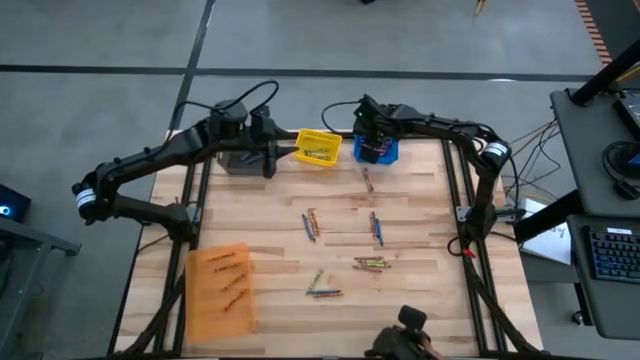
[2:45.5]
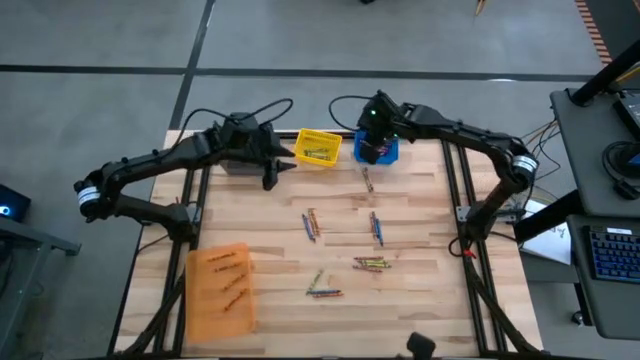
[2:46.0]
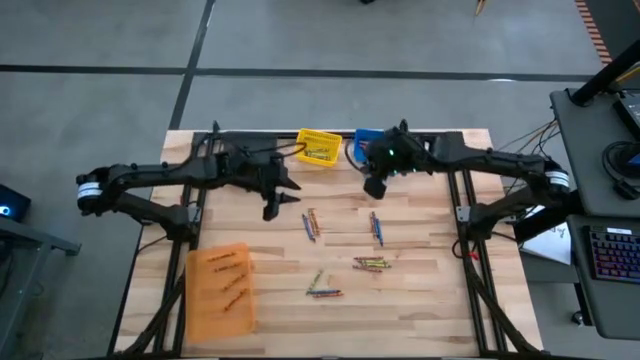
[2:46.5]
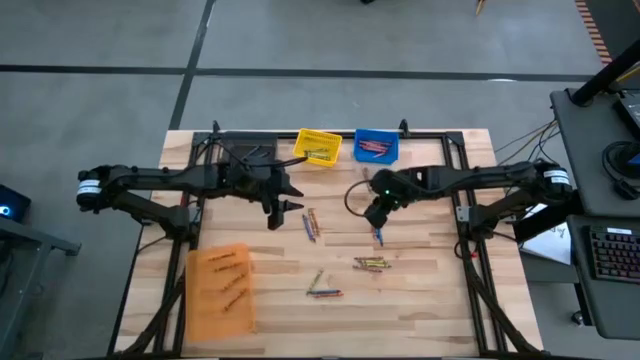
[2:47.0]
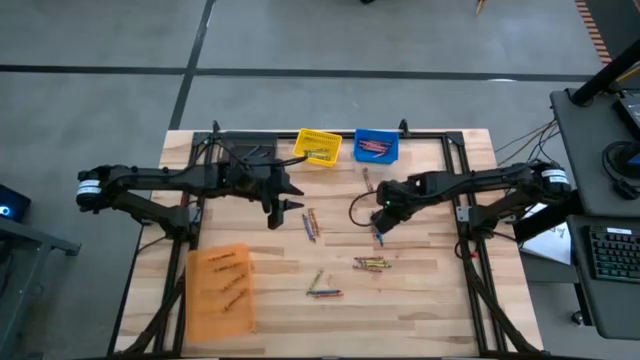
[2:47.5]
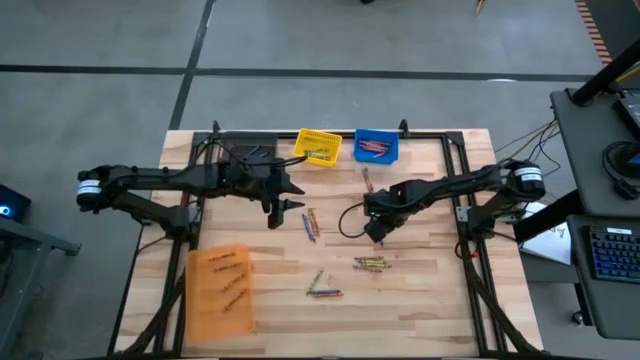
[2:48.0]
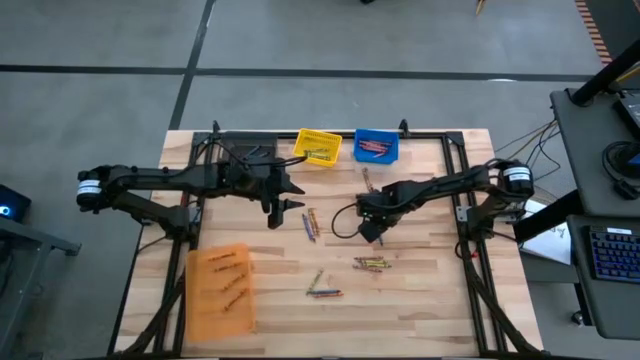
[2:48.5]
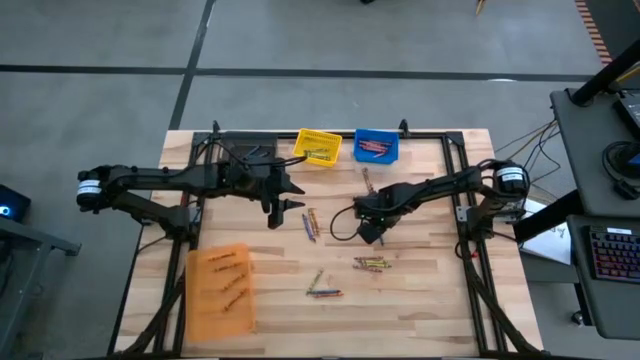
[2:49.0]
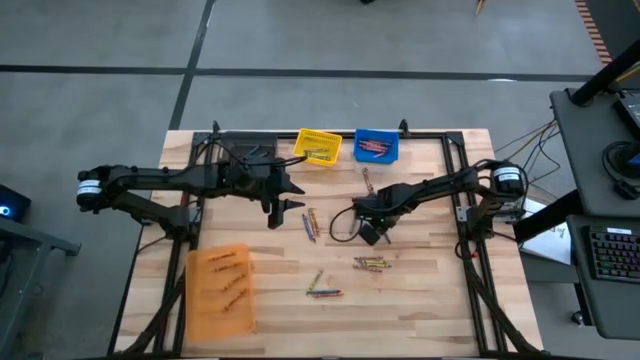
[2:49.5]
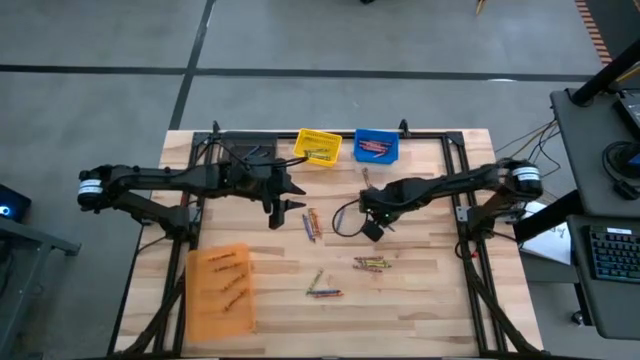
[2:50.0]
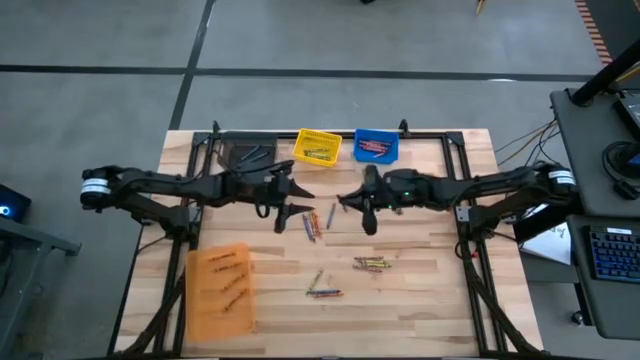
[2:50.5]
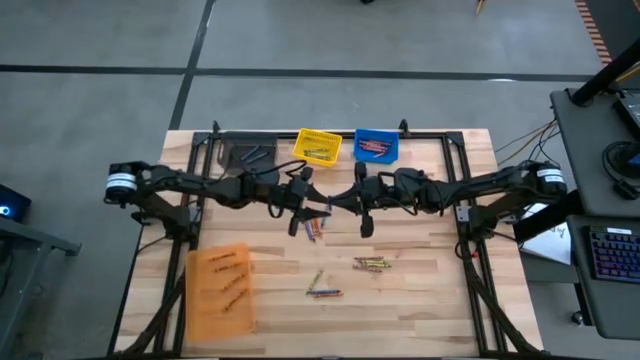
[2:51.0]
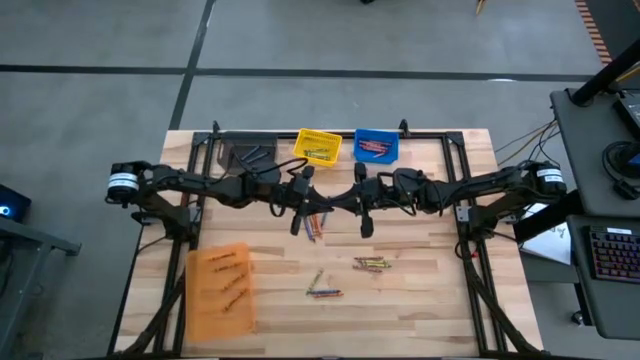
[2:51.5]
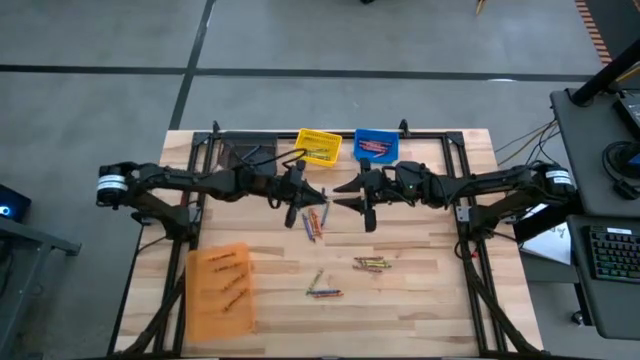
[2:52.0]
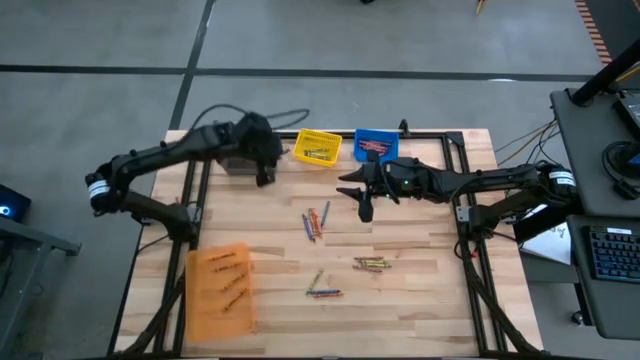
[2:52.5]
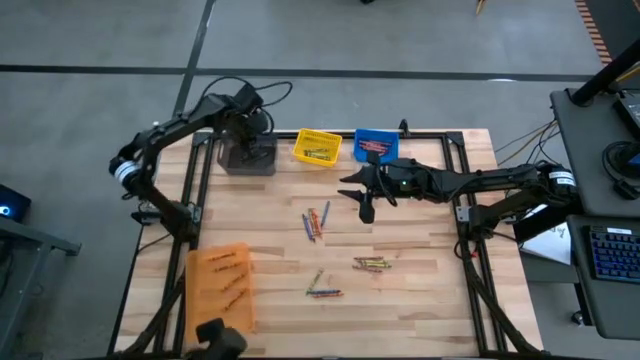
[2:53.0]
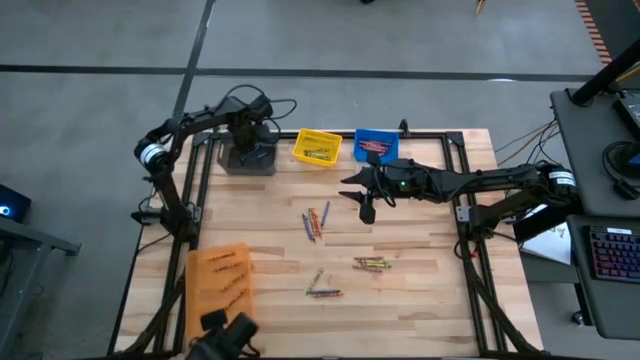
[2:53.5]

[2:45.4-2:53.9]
Task: Sort crayons
Put the blue crayon into the black bin

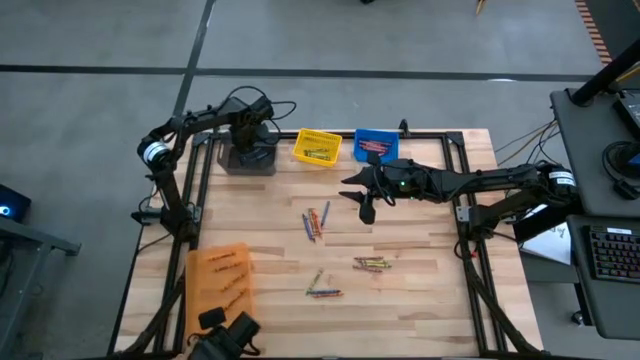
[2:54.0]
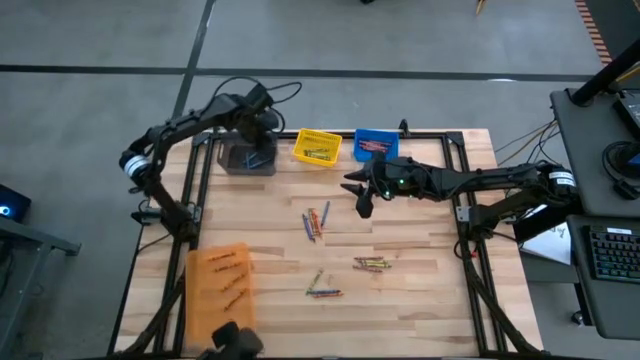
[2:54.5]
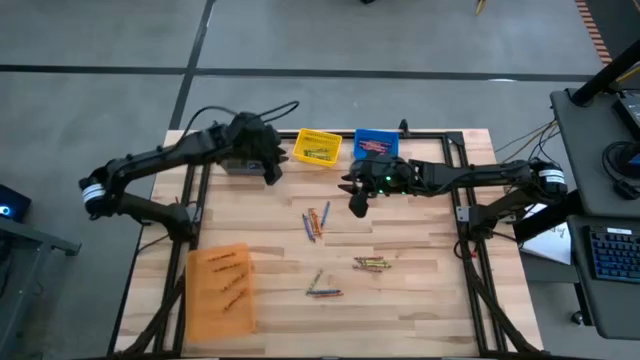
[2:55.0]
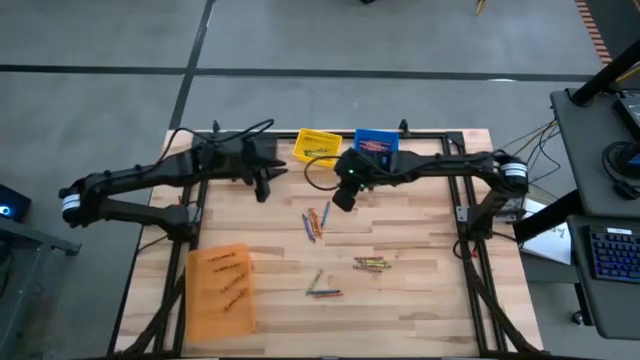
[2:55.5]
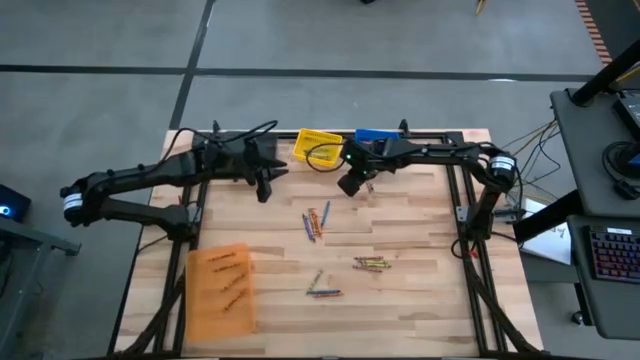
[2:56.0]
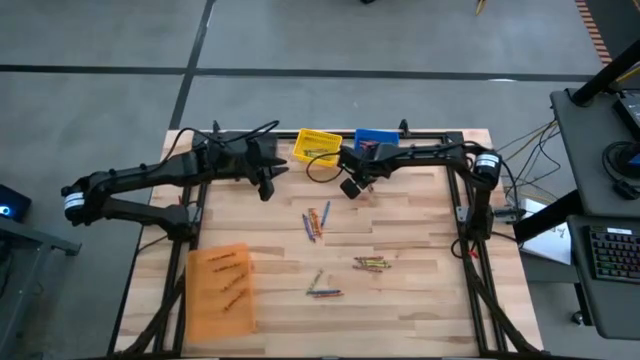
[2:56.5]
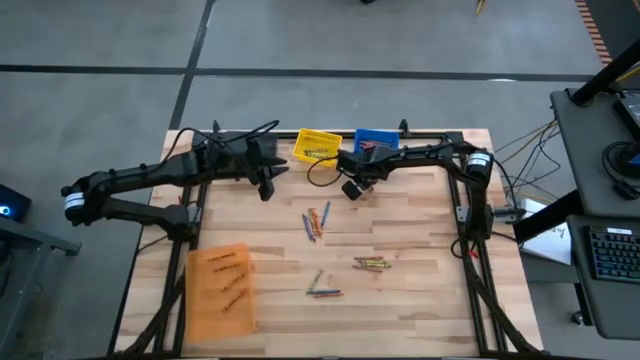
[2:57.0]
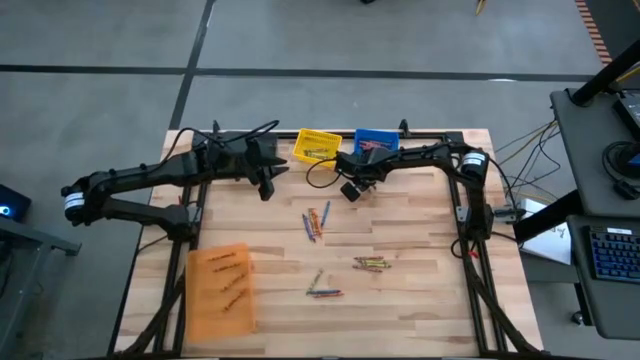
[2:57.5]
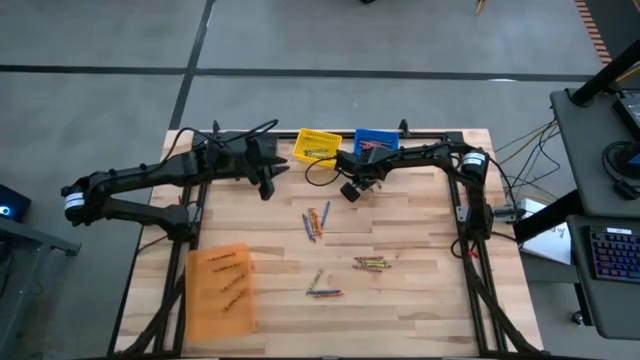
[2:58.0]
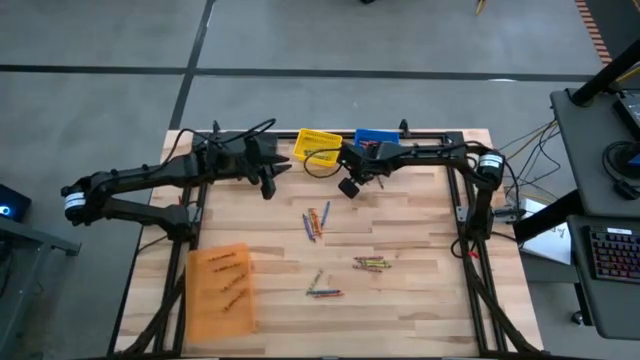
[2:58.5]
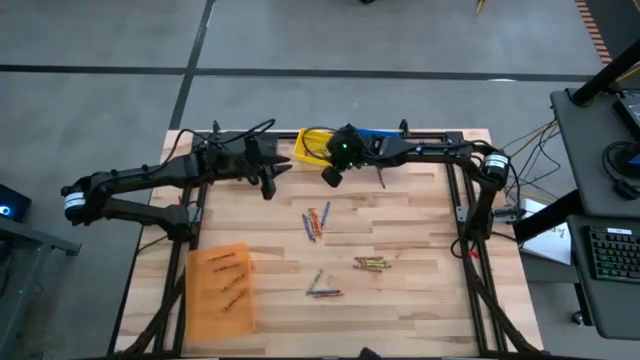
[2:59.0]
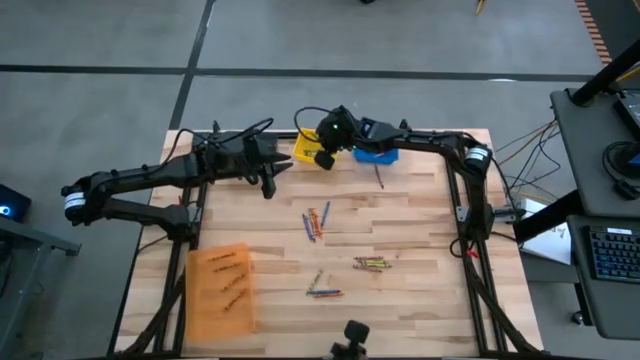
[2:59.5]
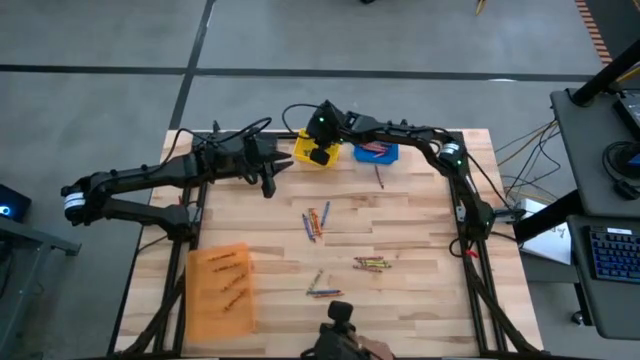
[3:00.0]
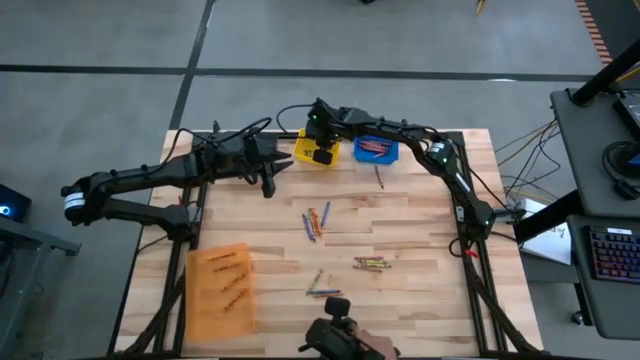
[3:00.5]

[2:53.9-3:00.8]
Put the green crayon into the yellow bin

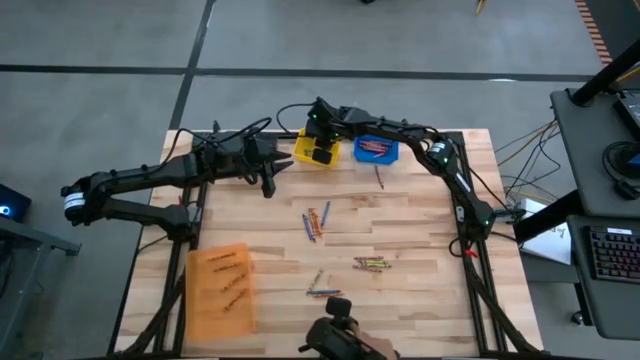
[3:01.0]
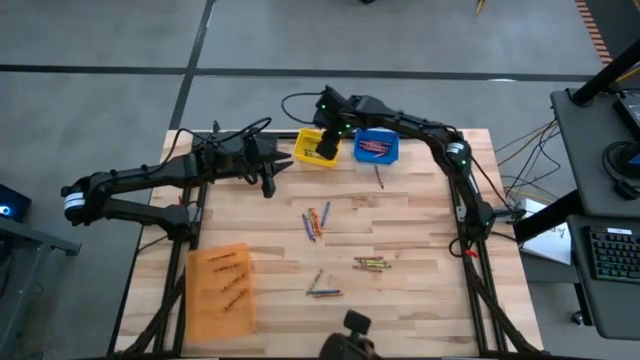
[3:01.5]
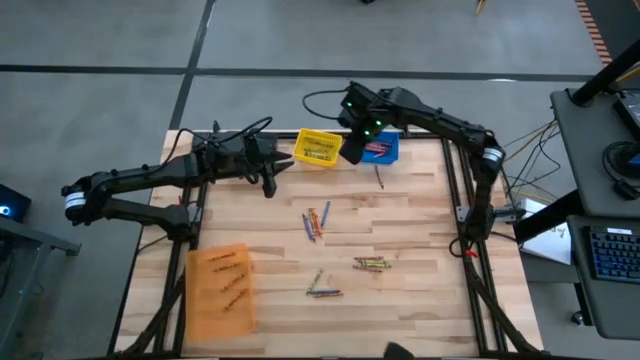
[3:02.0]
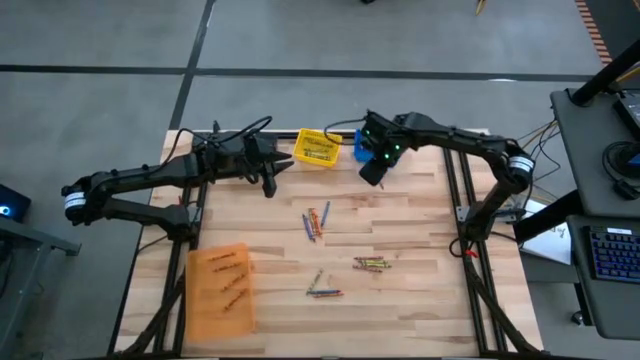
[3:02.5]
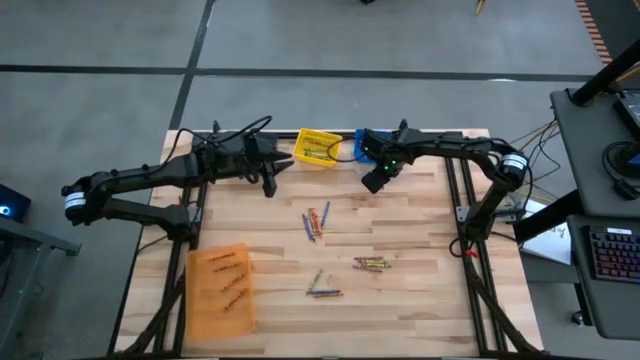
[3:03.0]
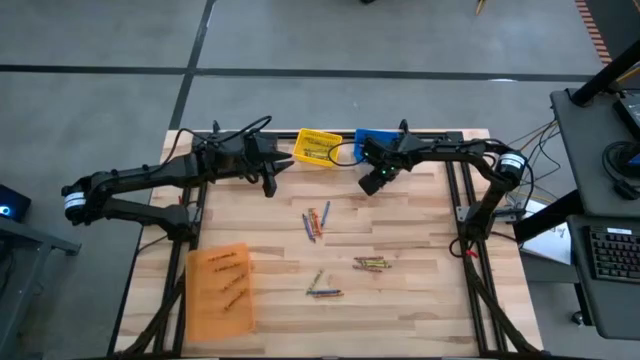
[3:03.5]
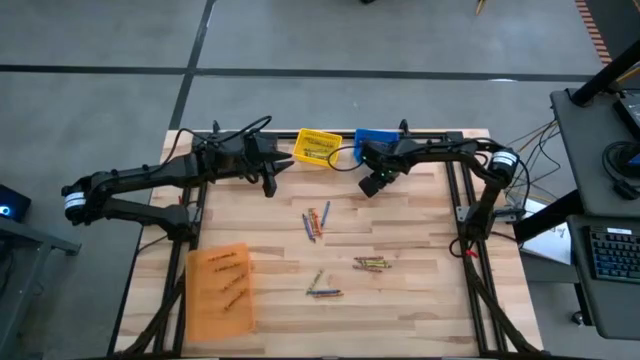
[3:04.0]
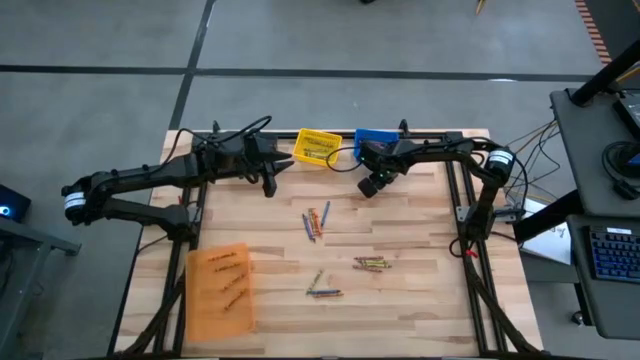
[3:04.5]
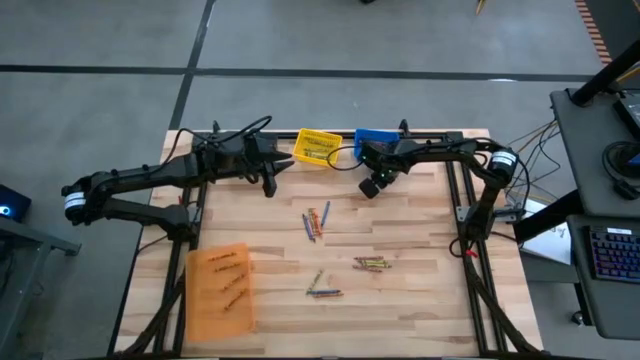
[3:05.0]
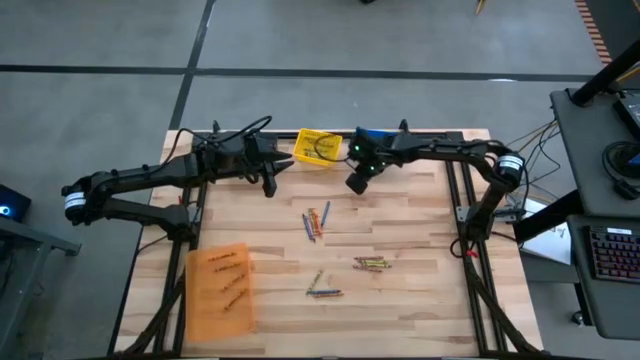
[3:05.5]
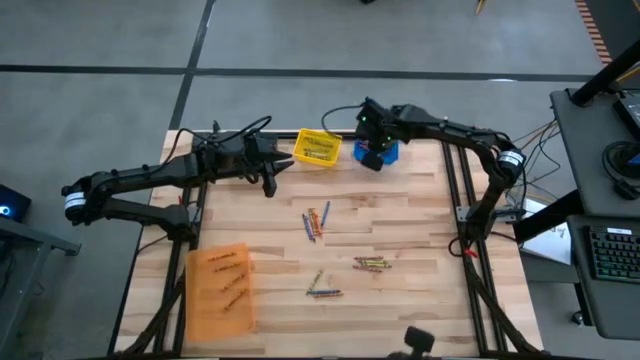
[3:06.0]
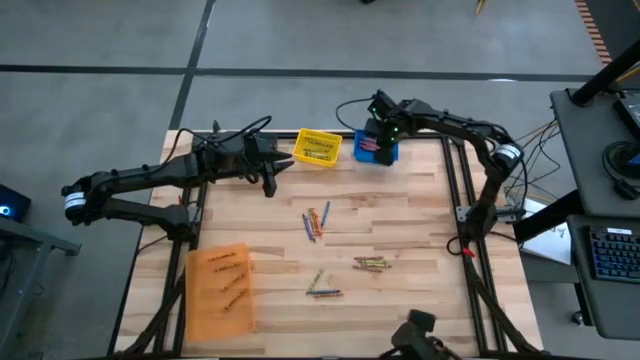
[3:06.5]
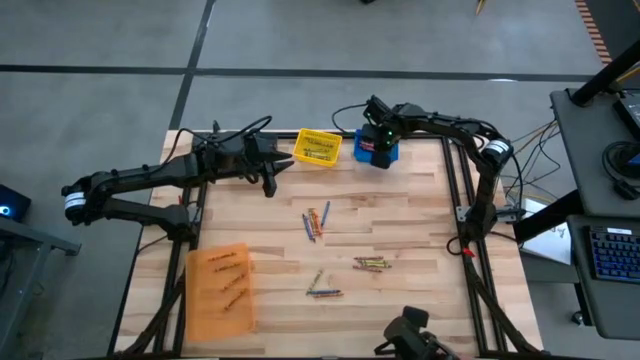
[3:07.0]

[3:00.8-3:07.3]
Put the red crayon into the blue bin
